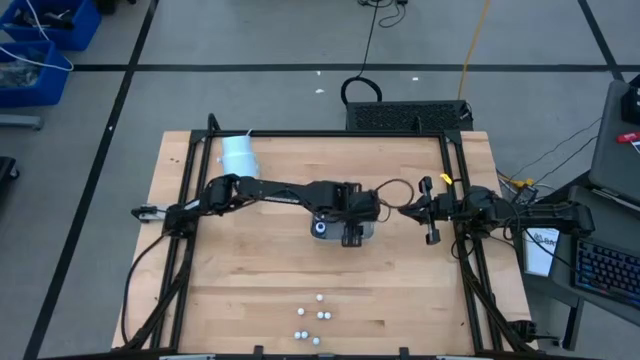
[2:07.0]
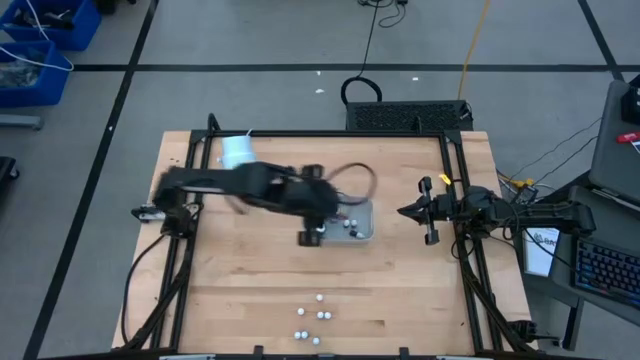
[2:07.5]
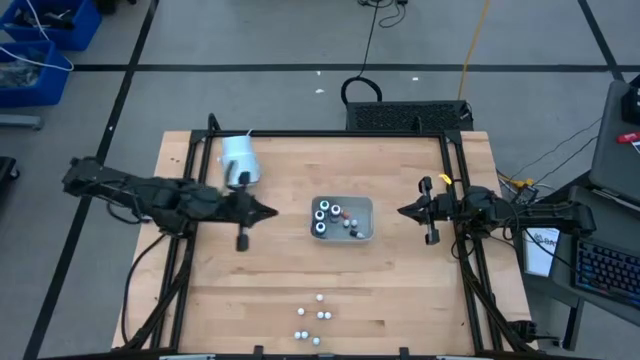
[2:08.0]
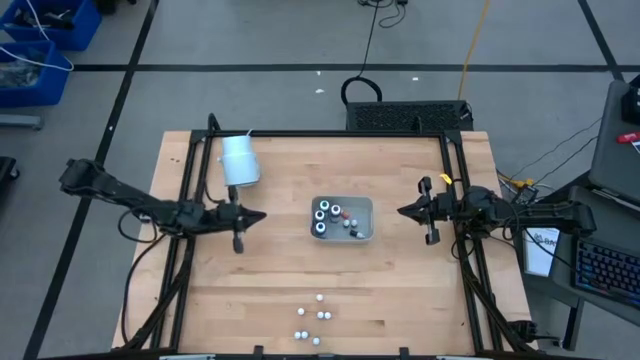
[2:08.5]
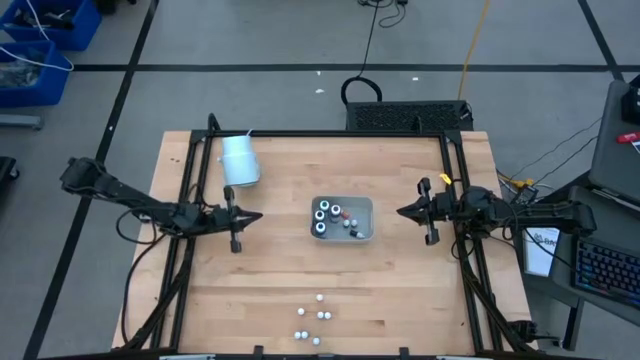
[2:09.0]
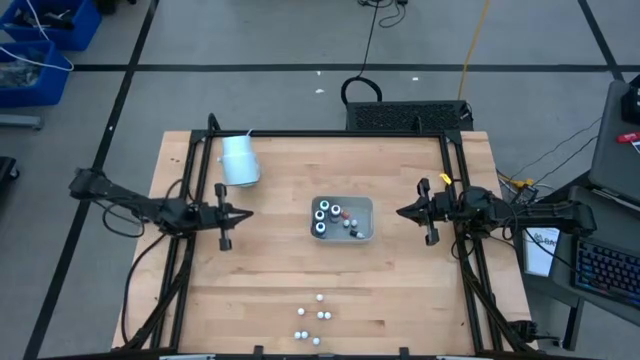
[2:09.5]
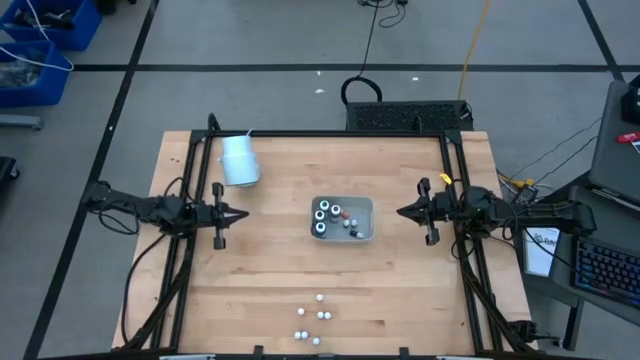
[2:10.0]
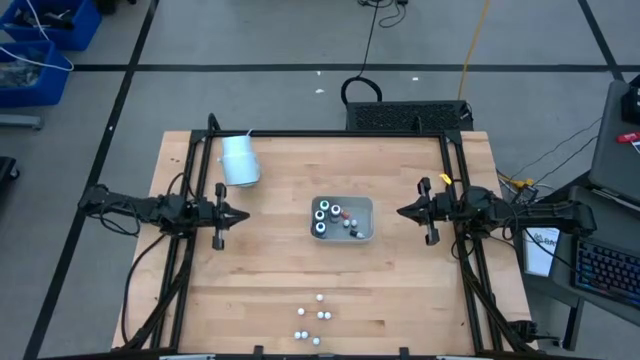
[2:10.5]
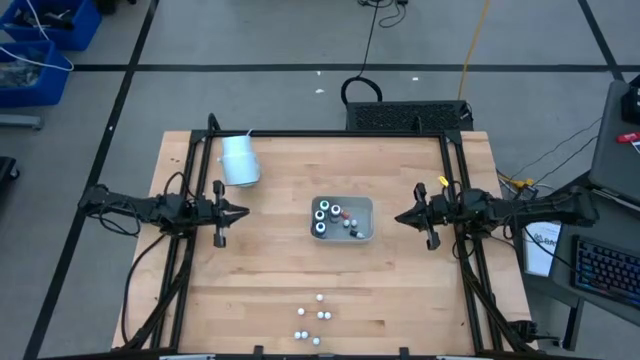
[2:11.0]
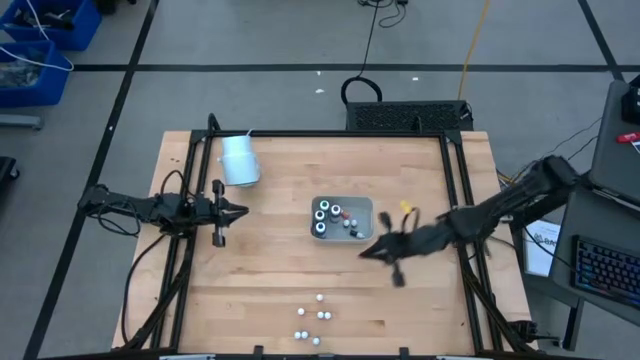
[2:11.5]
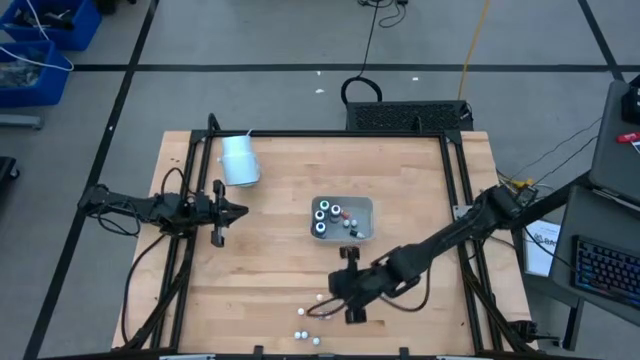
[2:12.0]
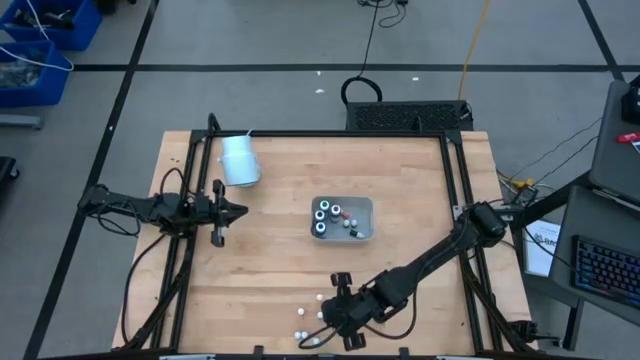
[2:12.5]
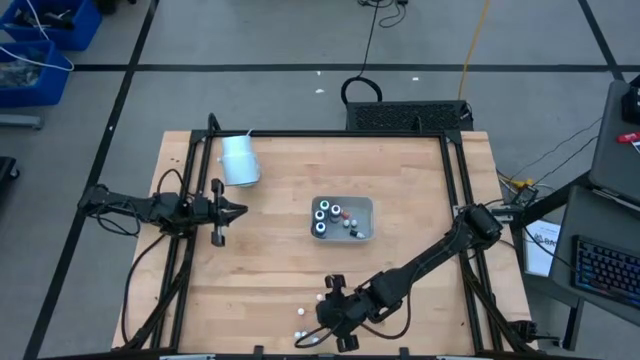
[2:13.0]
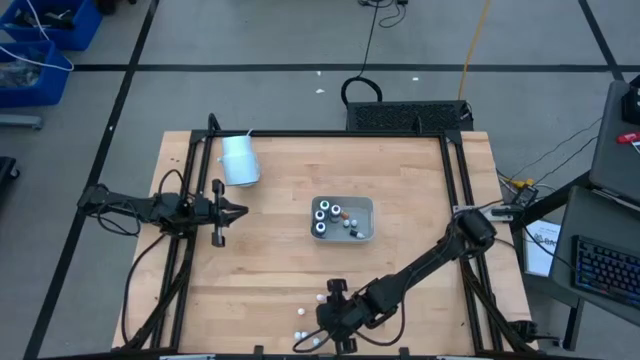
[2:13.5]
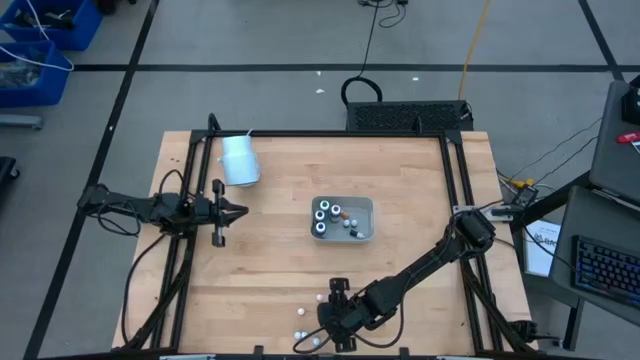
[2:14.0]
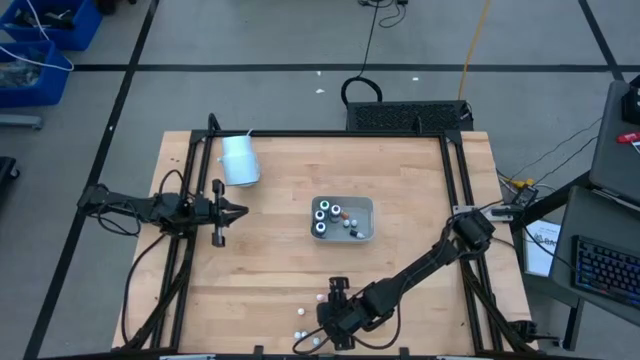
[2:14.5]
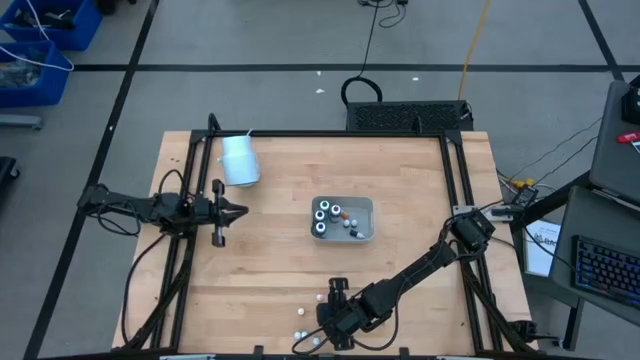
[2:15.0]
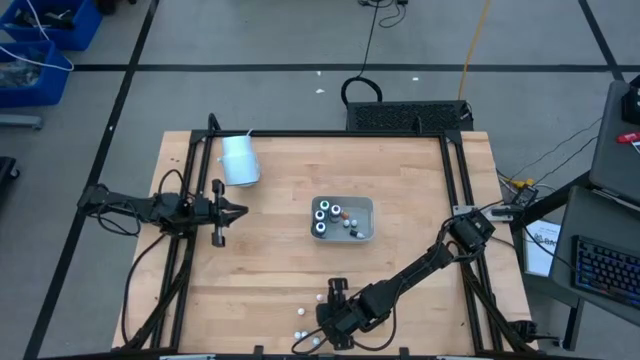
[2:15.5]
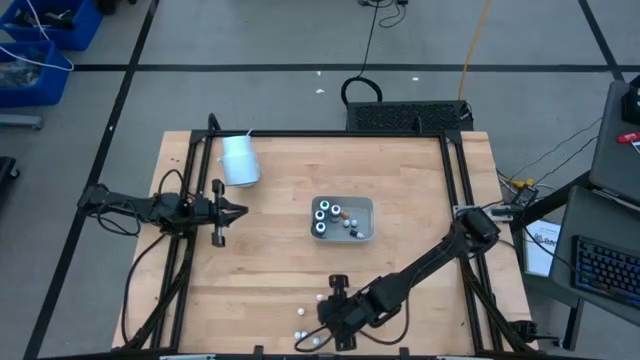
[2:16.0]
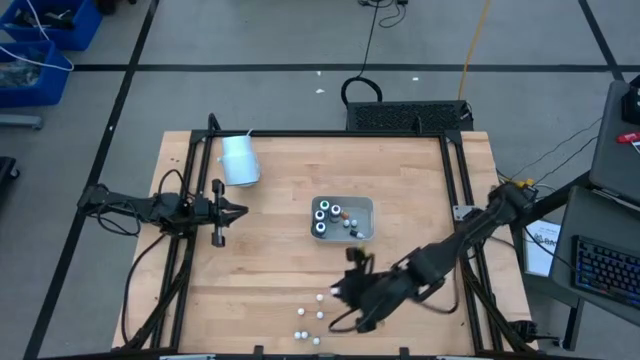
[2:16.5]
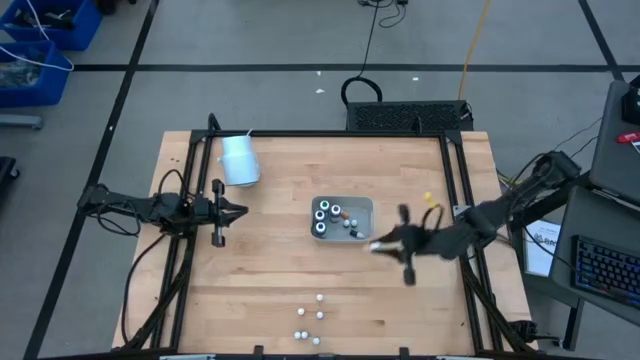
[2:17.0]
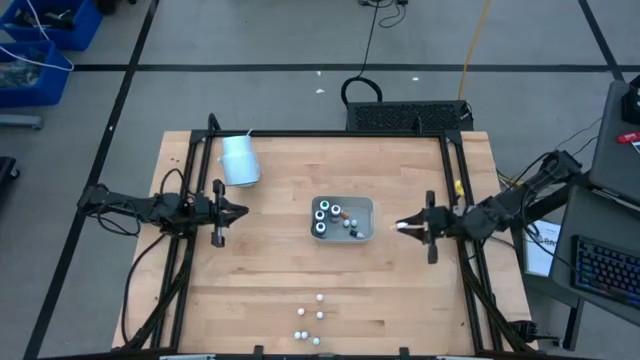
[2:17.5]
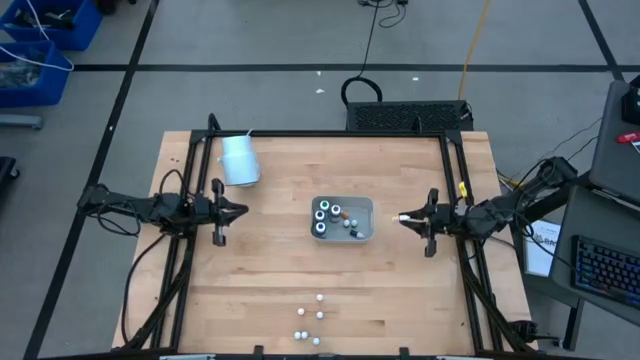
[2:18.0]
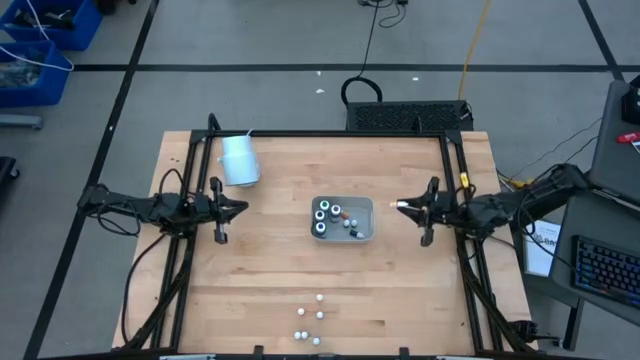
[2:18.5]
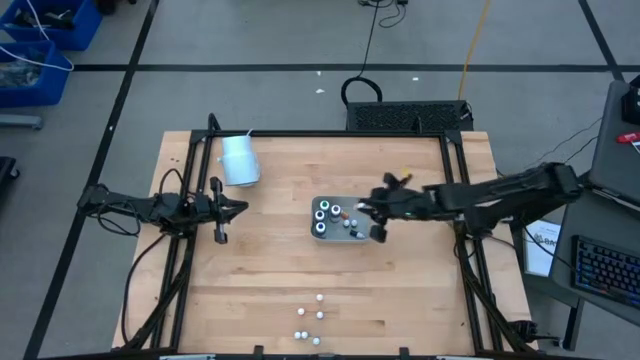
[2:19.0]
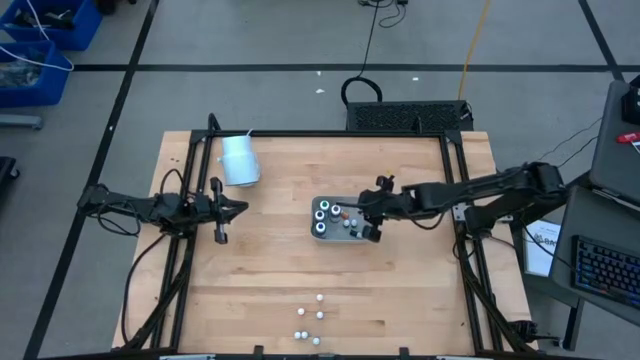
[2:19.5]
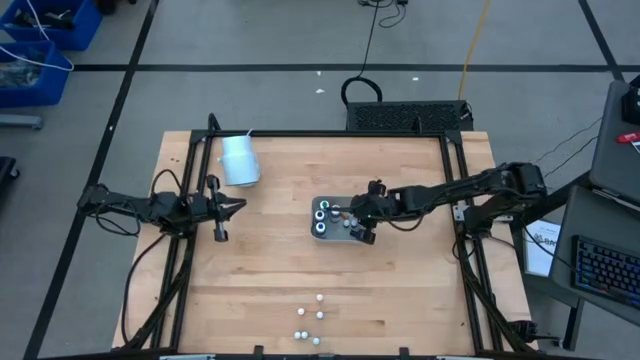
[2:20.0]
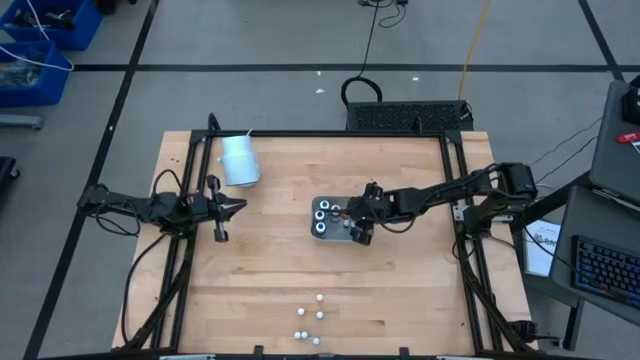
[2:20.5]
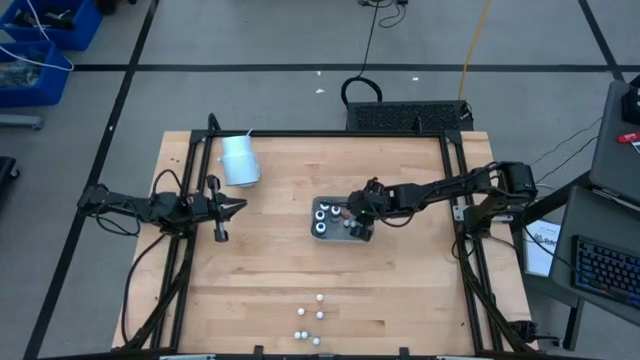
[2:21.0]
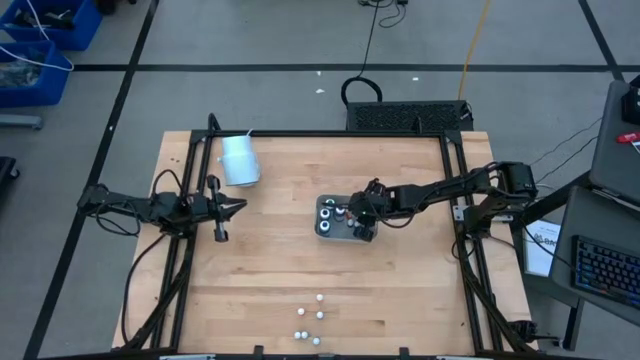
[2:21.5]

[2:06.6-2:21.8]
Task: Pick & Place food coloring
Put the bottom right orange food coloring bottle into the bin

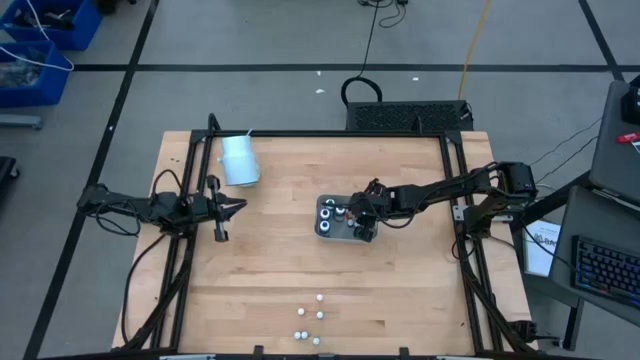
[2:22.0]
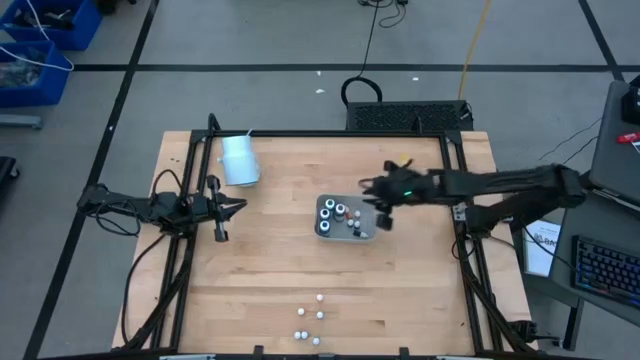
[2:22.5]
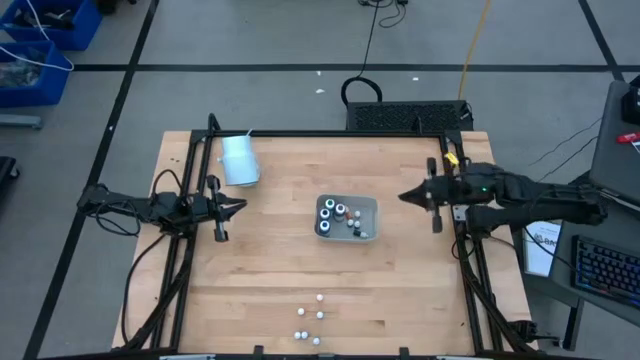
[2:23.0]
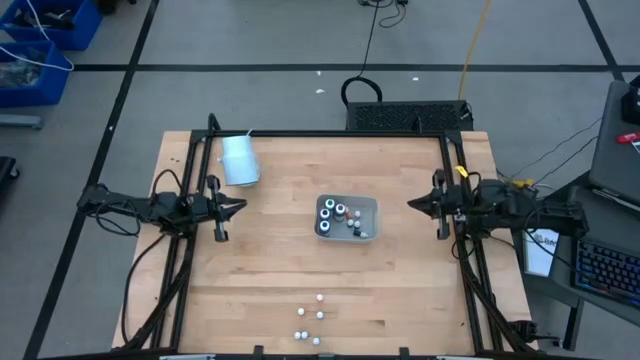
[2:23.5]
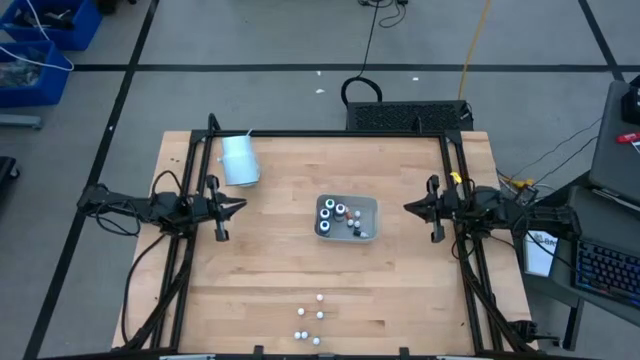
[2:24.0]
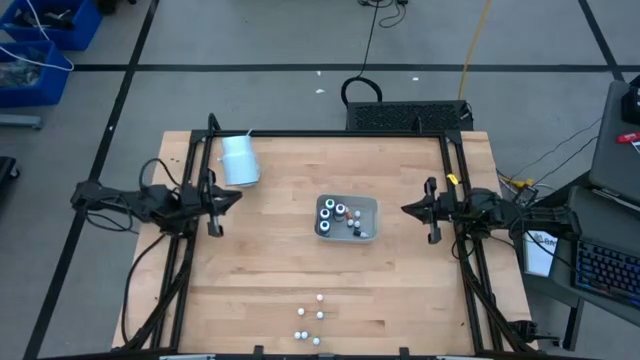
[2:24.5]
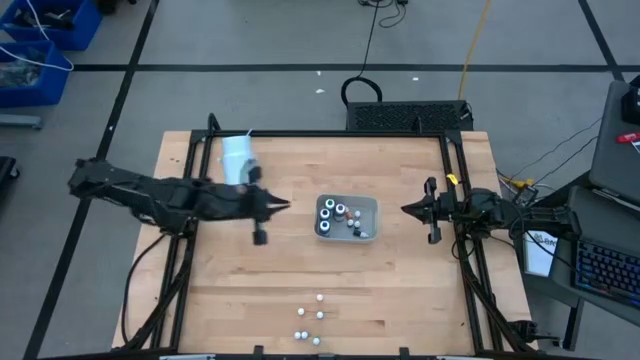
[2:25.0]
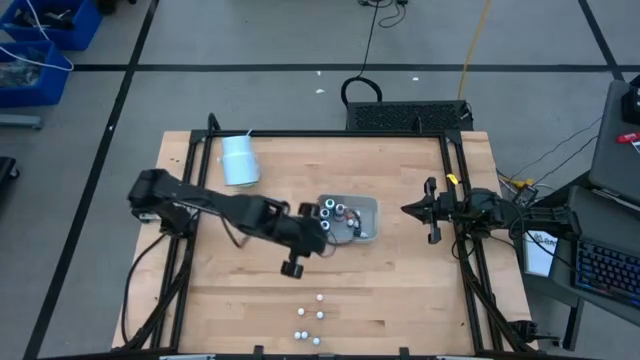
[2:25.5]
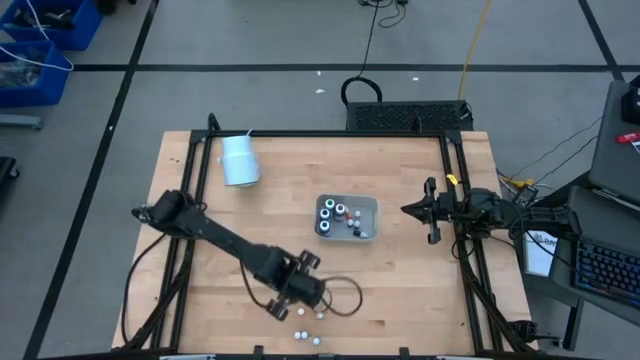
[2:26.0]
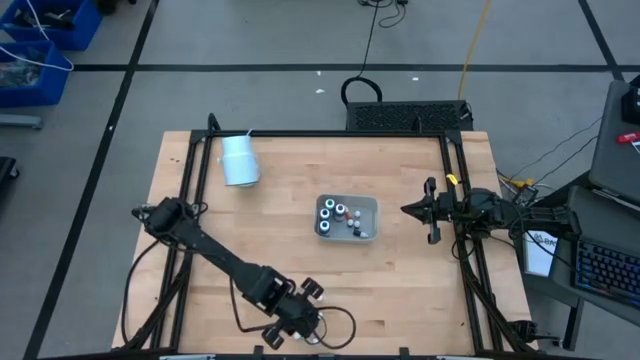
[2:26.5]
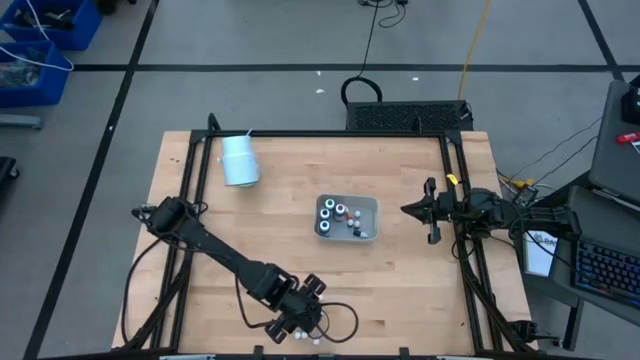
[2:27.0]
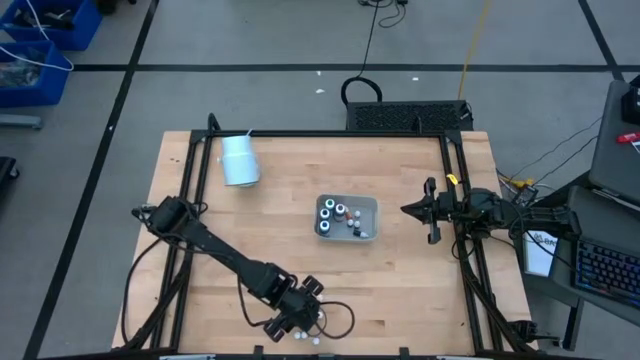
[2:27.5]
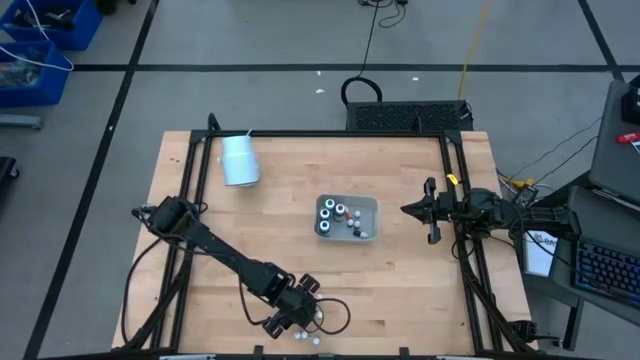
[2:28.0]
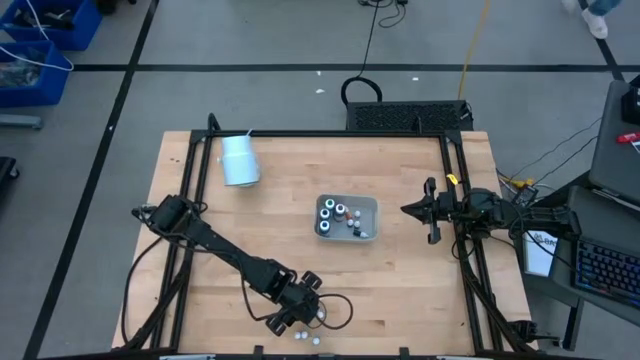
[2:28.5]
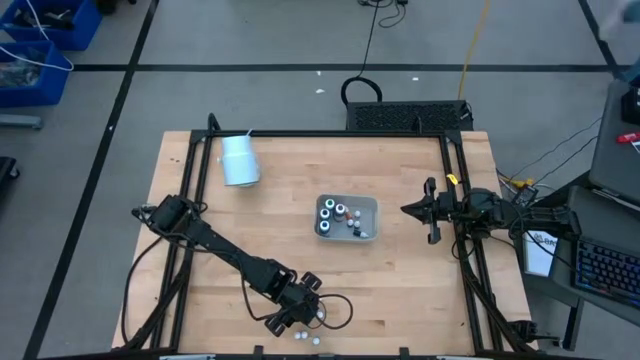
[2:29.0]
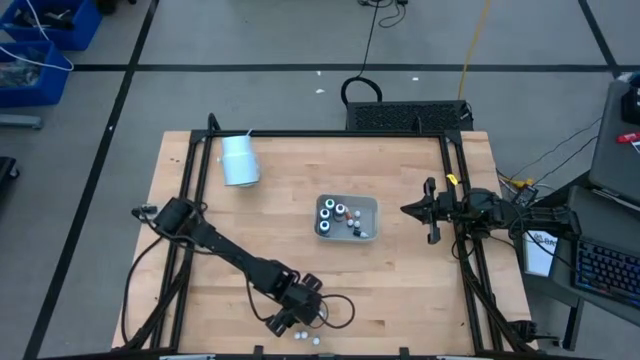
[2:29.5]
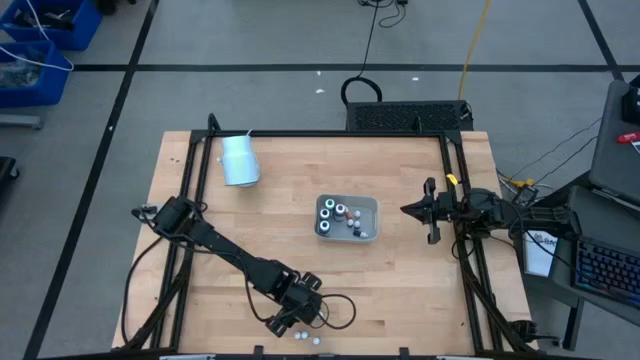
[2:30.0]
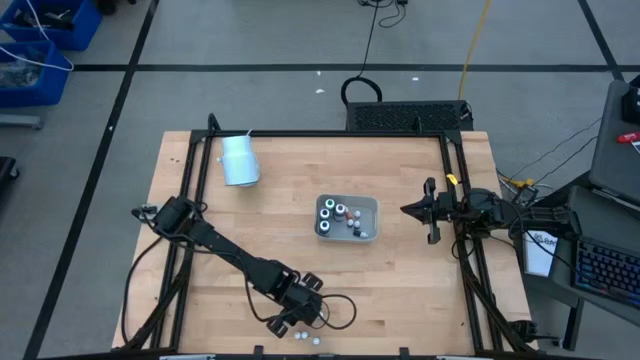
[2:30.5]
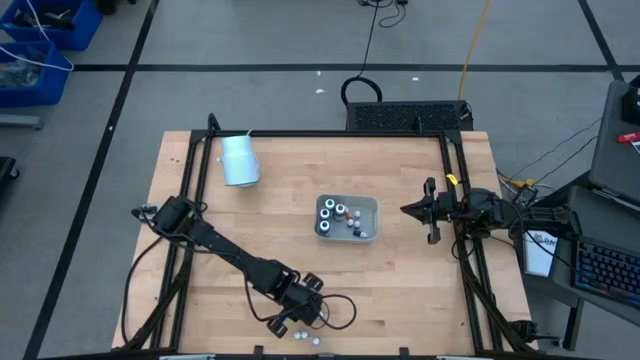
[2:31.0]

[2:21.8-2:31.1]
Put the bottom orange food coloring bottle into the bin
